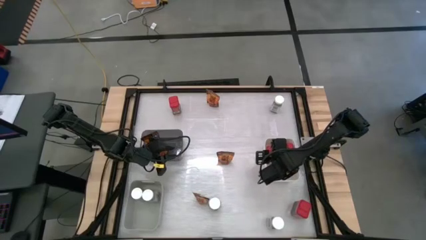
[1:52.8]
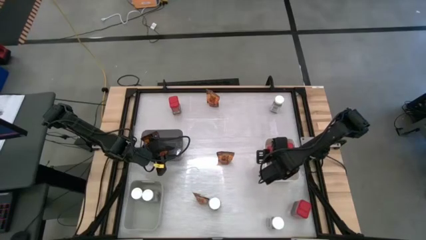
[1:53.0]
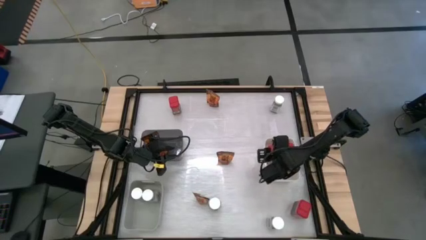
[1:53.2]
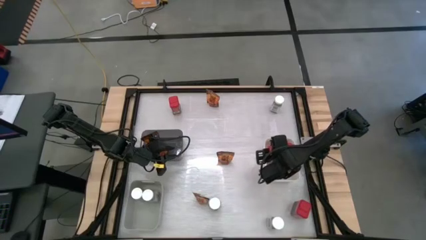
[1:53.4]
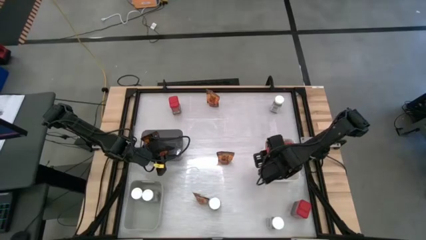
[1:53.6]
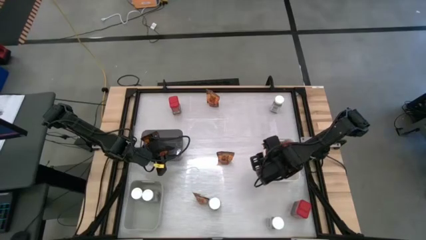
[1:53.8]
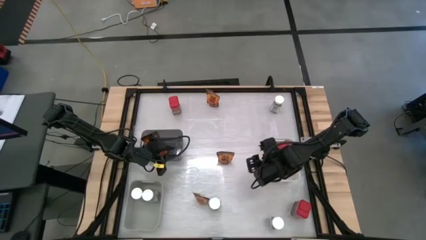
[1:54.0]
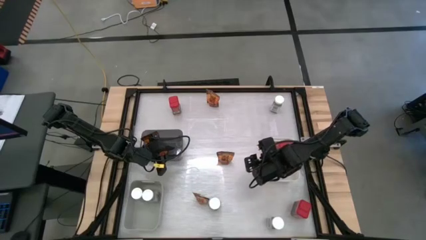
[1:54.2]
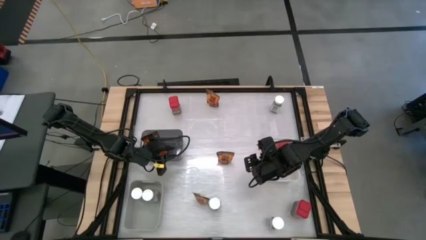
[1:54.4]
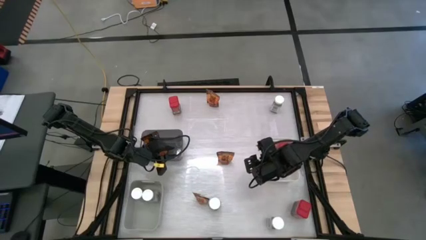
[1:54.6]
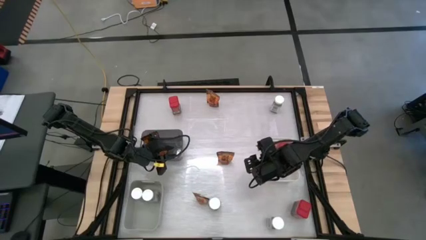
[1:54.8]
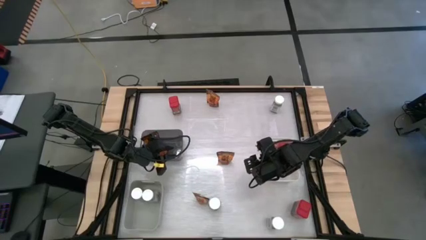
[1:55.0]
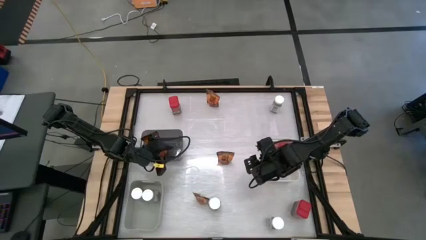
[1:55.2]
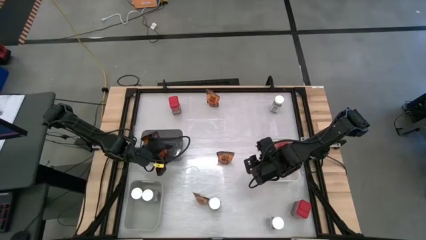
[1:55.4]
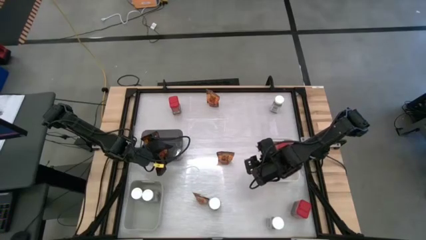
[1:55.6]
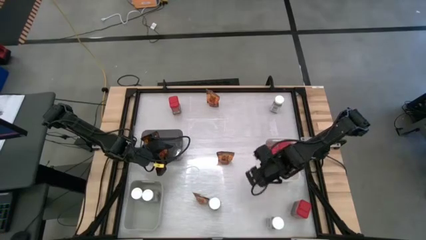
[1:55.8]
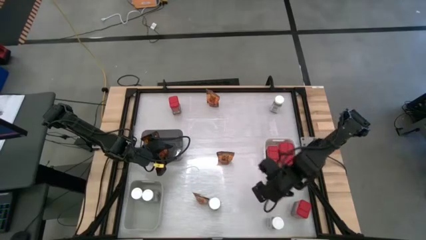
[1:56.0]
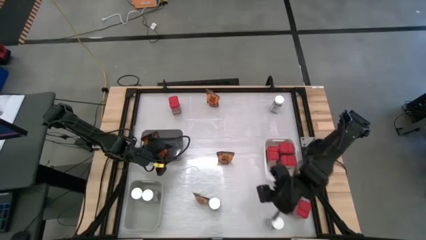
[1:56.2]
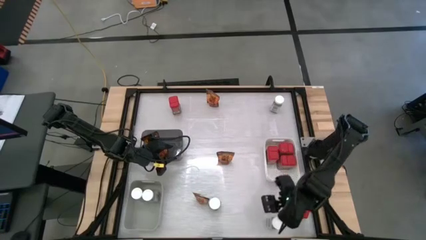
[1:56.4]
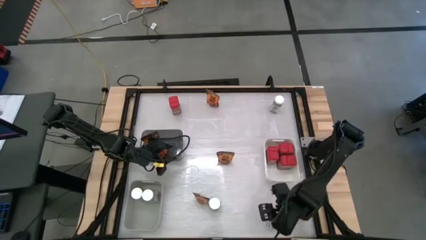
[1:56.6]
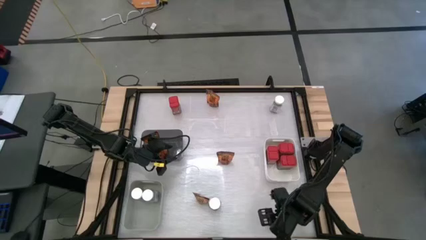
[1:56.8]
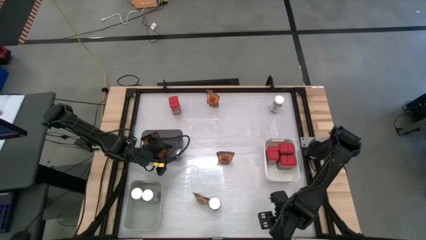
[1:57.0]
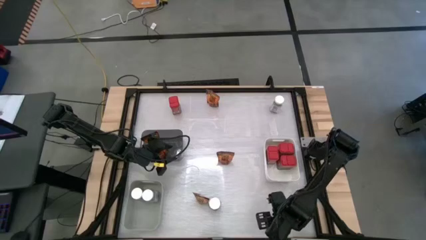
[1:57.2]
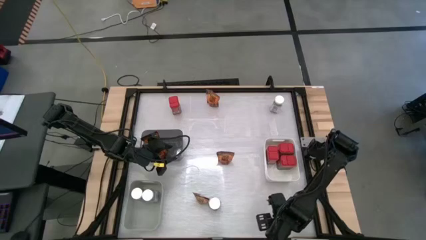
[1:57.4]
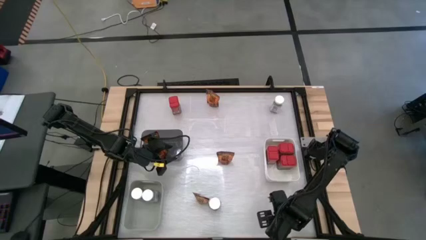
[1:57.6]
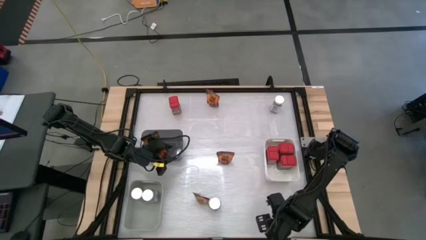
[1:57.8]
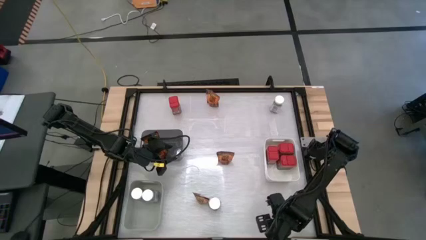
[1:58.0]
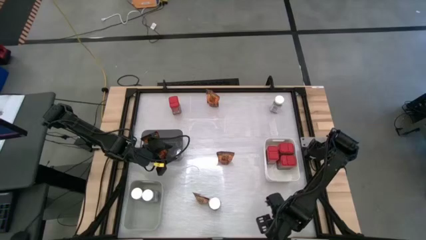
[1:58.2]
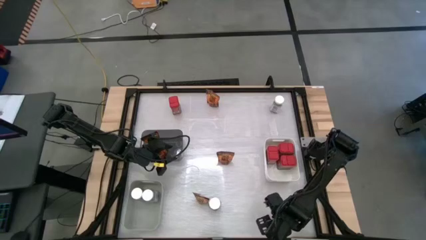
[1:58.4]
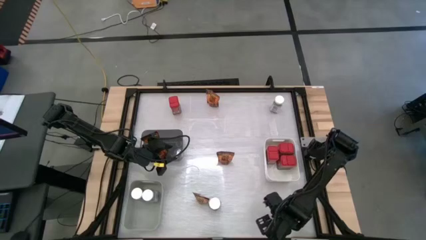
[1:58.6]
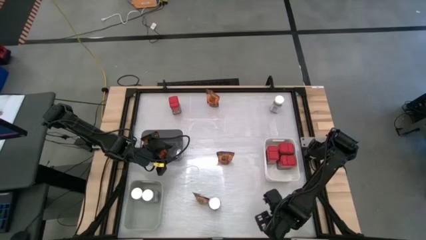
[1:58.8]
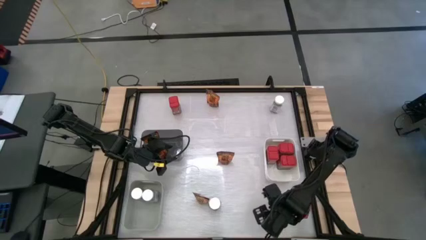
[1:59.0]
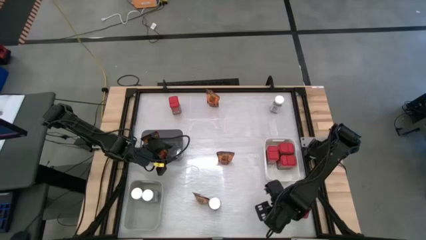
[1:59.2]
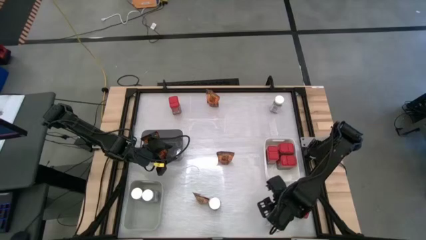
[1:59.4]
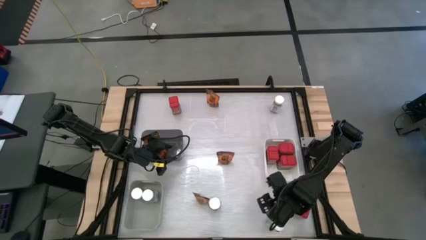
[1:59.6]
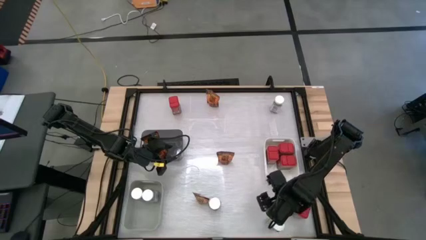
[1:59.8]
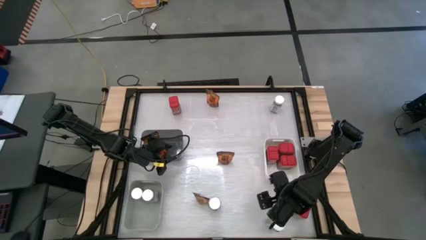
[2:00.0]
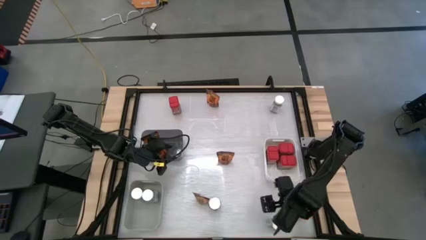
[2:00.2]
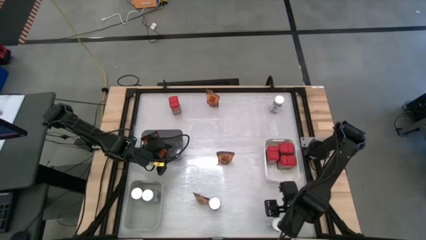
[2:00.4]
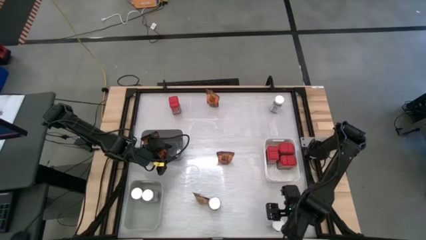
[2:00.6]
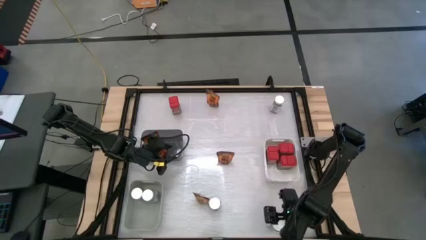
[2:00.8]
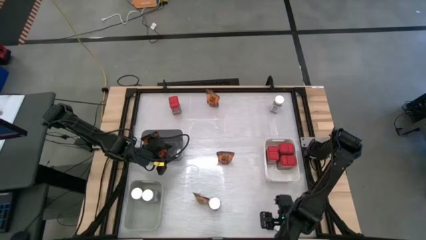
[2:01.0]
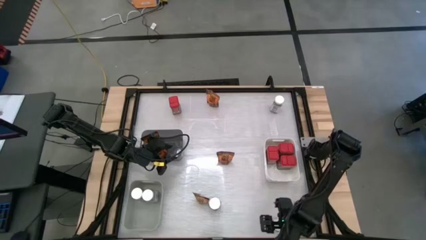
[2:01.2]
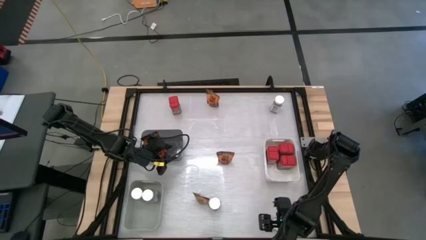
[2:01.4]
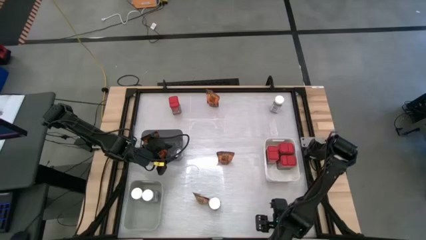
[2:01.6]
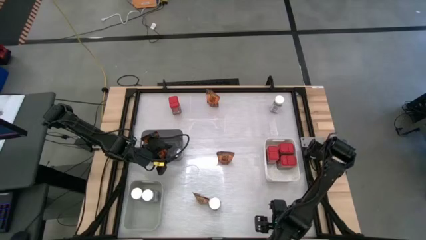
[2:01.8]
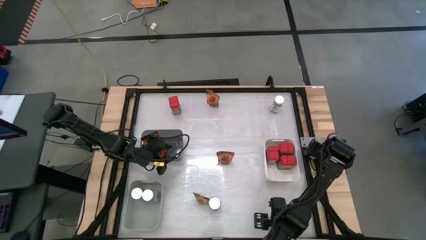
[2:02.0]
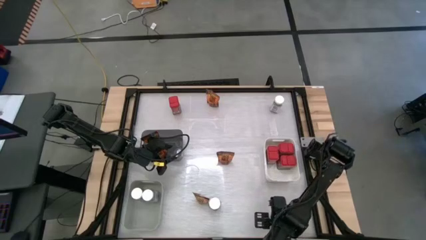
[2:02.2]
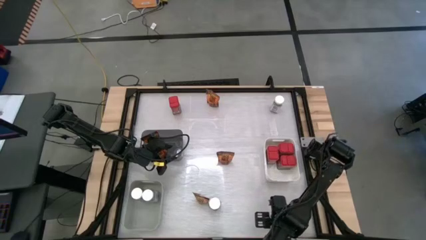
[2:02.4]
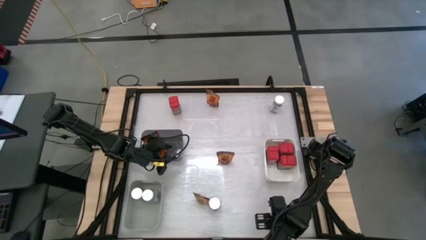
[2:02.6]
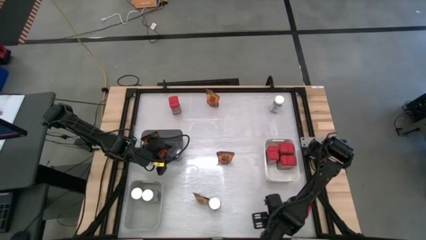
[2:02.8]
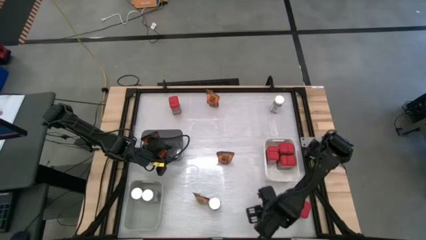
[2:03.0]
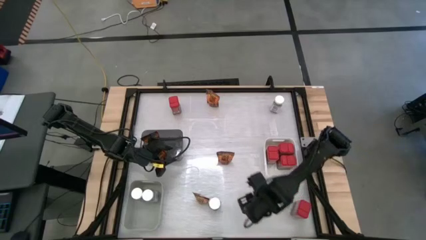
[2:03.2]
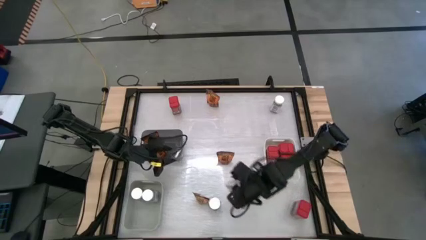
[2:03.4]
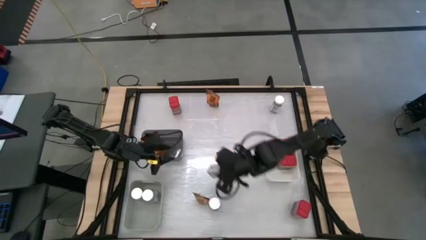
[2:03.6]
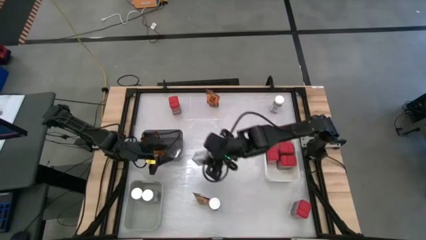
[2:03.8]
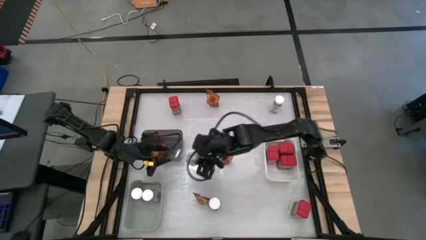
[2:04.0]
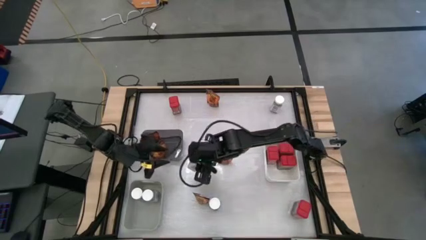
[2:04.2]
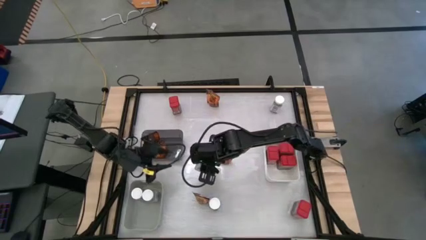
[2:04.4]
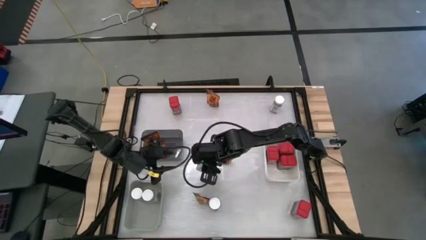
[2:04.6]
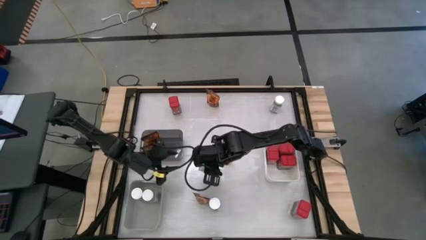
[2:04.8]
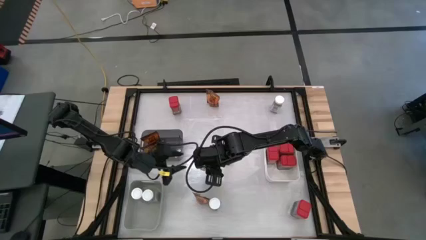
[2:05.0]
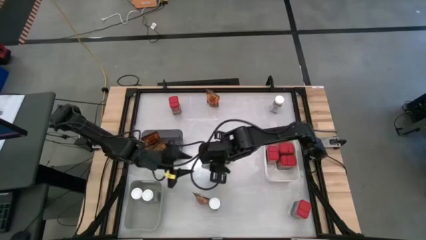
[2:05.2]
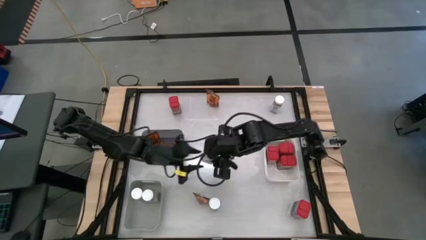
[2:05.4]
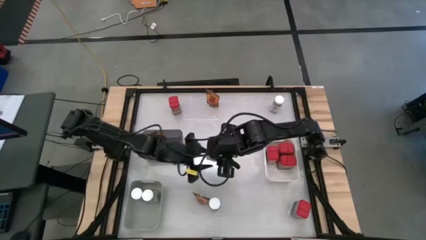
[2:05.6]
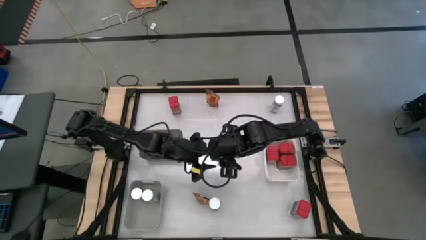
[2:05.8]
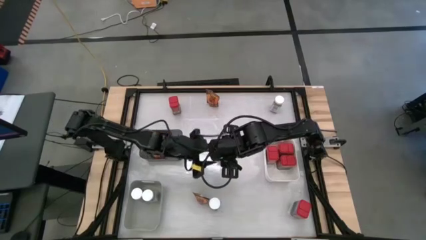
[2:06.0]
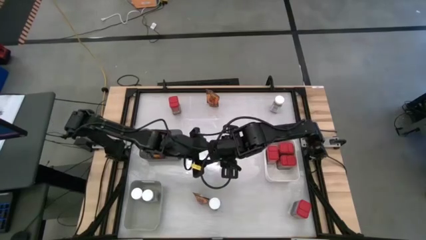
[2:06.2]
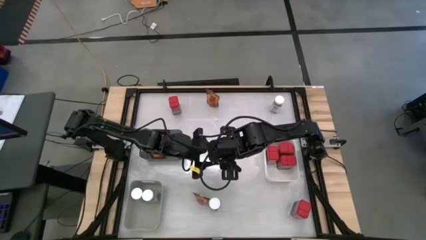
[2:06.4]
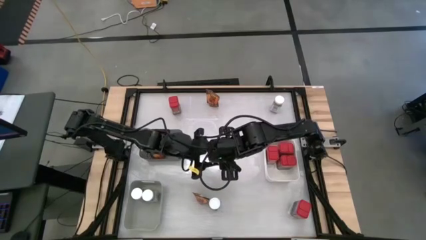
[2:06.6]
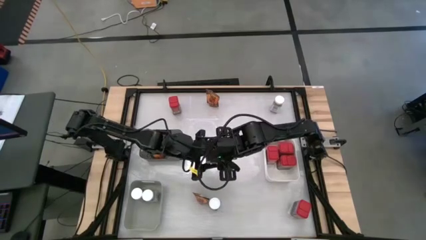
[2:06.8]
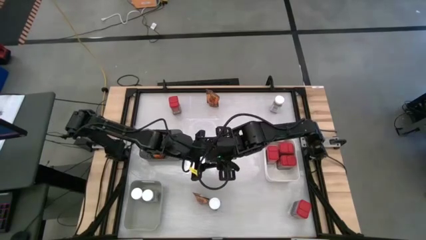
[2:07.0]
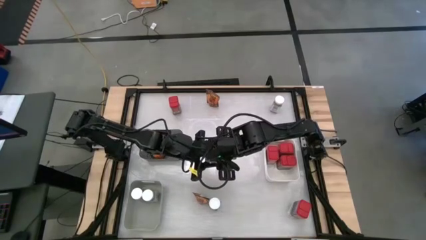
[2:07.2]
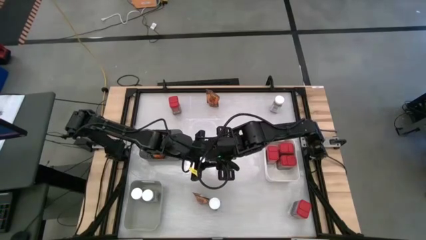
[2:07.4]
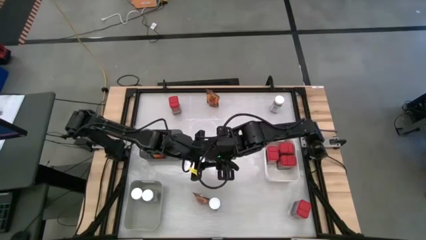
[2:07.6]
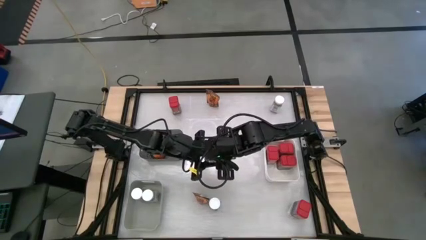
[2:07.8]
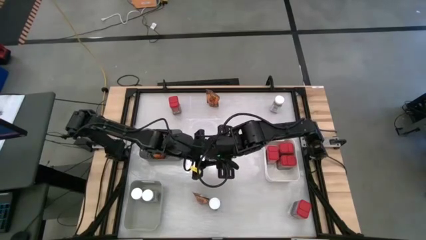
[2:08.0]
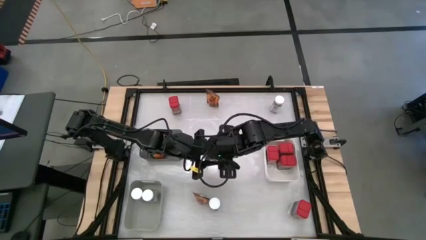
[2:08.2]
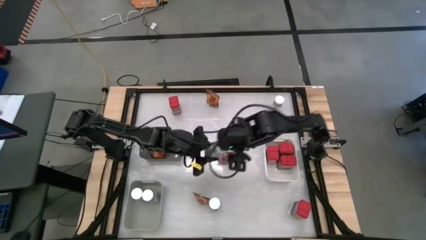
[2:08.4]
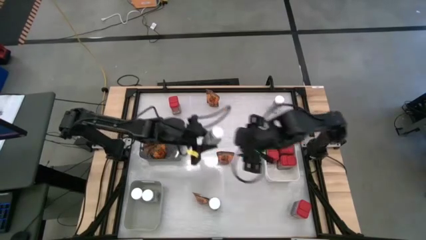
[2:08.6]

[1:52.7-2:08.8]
Task: Sort spices by type
Put the white spice bottle into the gray bin
